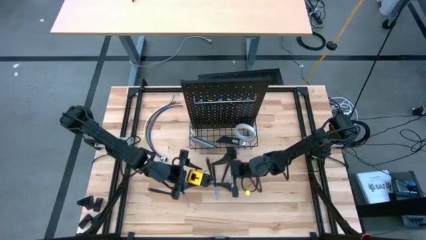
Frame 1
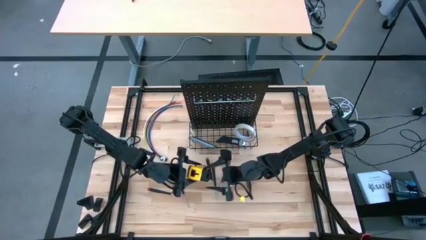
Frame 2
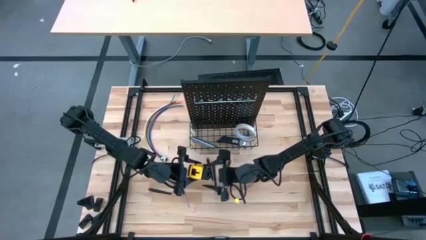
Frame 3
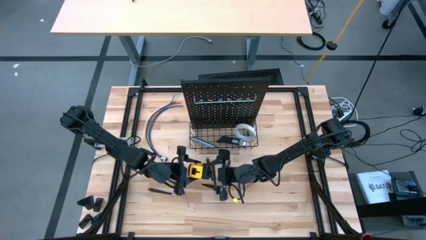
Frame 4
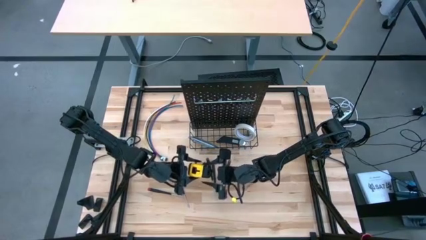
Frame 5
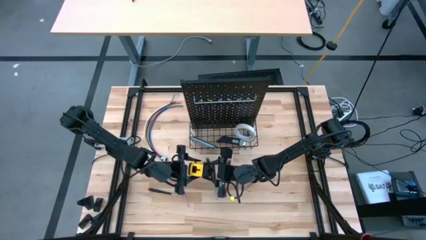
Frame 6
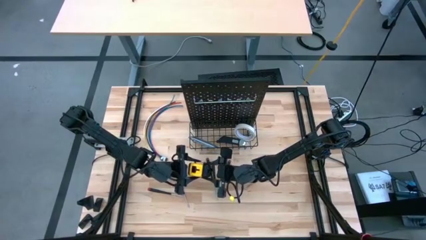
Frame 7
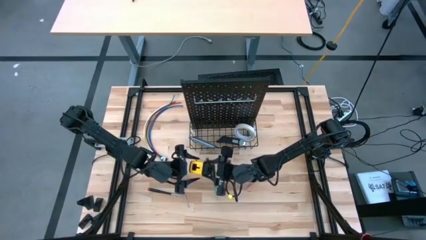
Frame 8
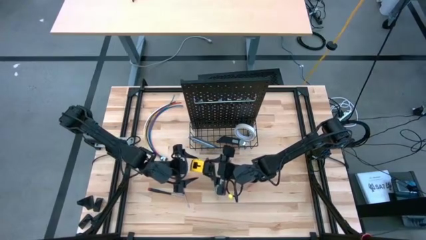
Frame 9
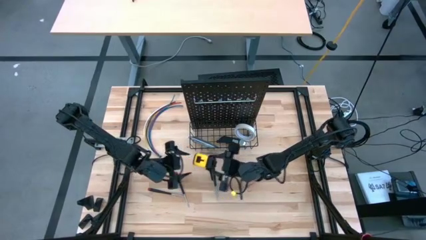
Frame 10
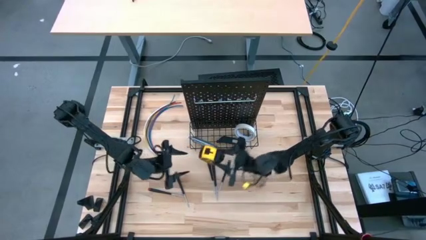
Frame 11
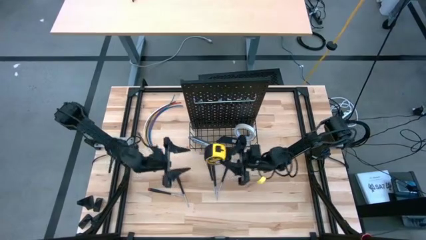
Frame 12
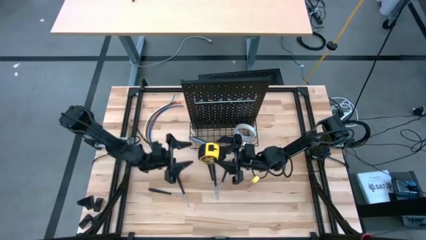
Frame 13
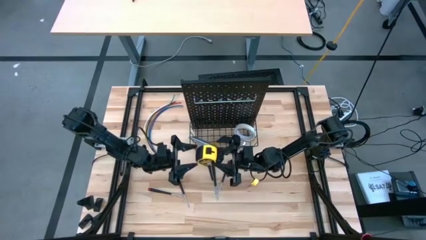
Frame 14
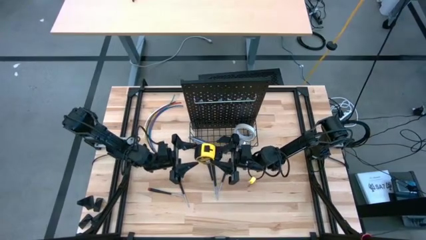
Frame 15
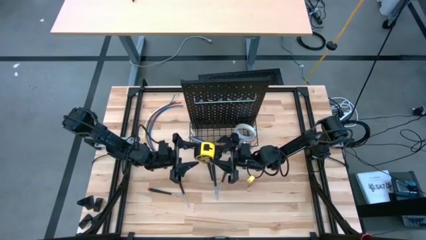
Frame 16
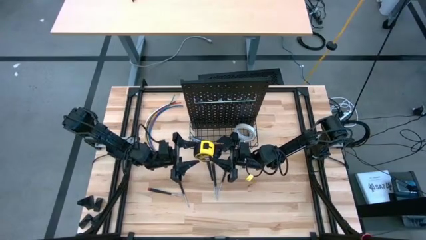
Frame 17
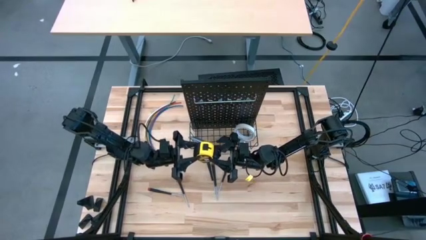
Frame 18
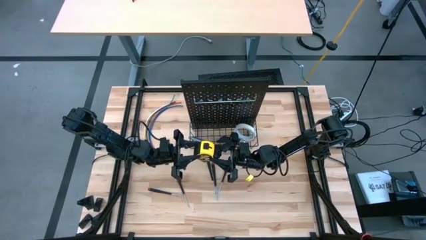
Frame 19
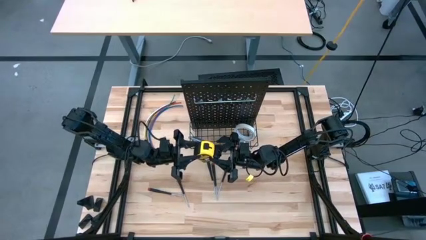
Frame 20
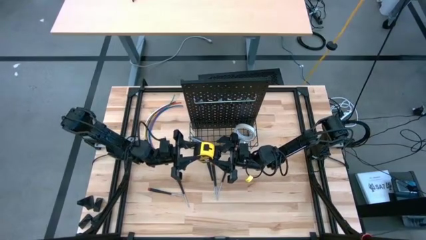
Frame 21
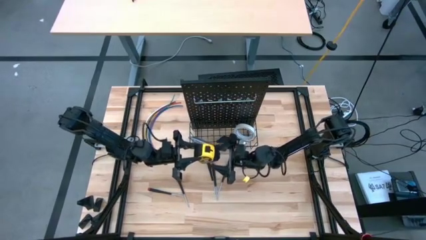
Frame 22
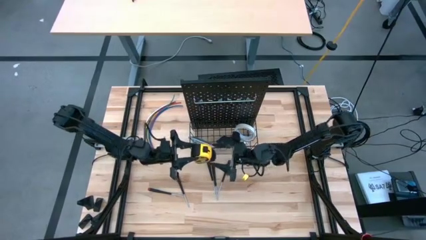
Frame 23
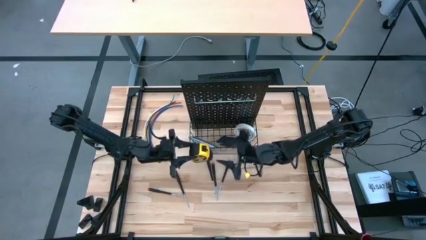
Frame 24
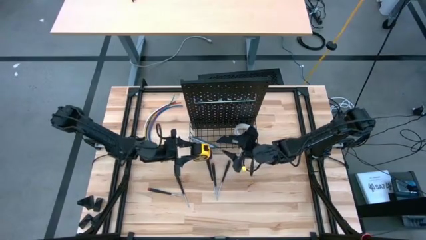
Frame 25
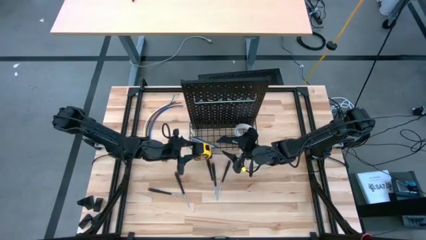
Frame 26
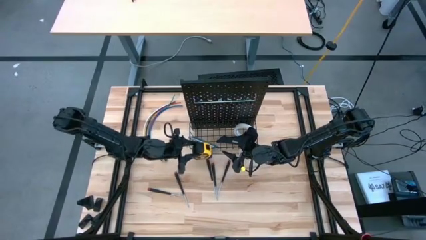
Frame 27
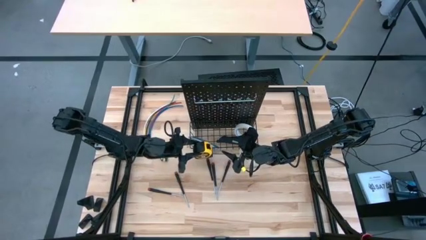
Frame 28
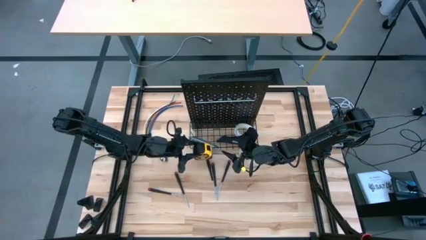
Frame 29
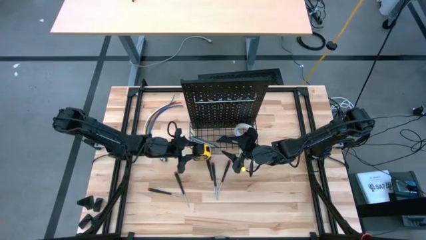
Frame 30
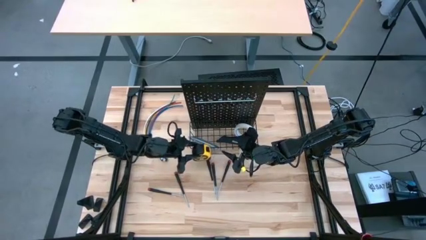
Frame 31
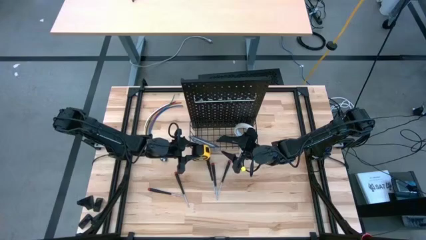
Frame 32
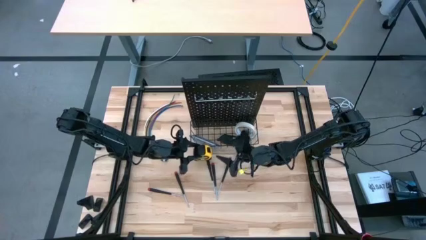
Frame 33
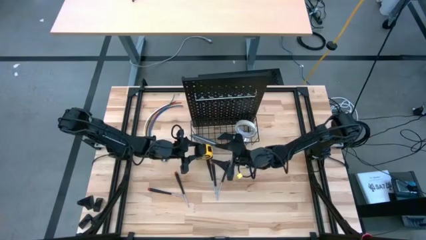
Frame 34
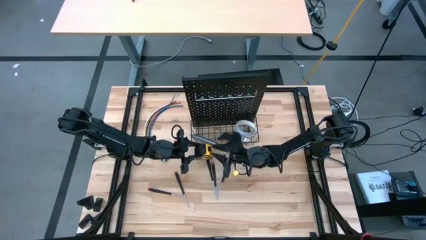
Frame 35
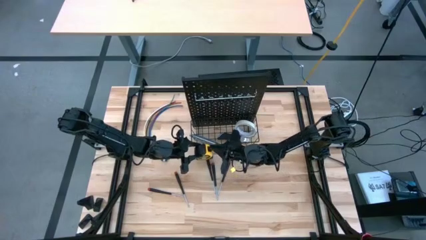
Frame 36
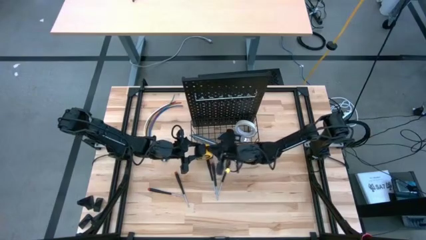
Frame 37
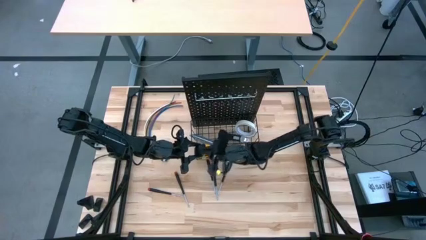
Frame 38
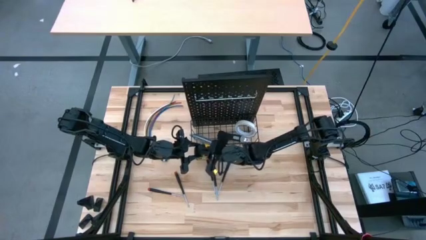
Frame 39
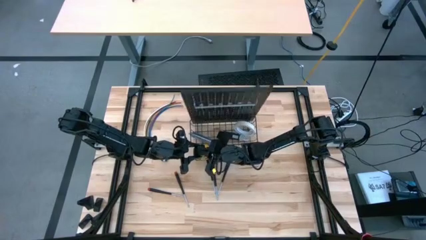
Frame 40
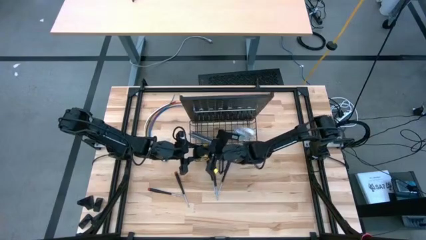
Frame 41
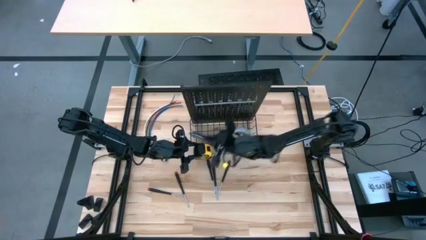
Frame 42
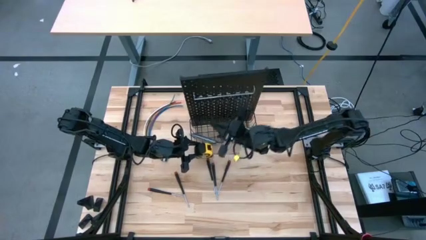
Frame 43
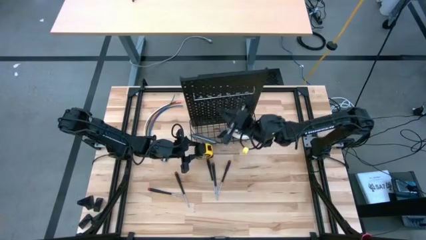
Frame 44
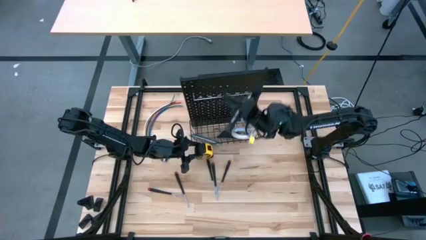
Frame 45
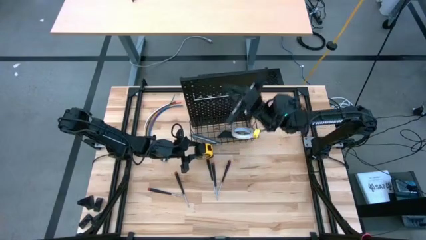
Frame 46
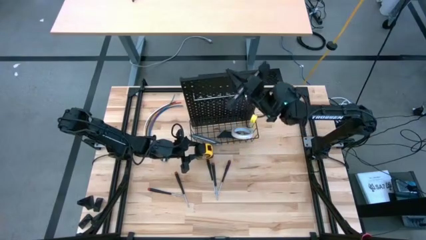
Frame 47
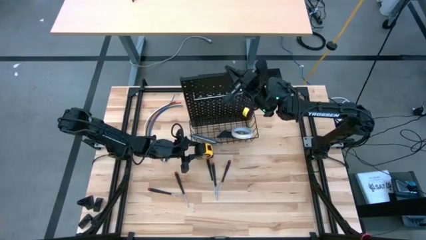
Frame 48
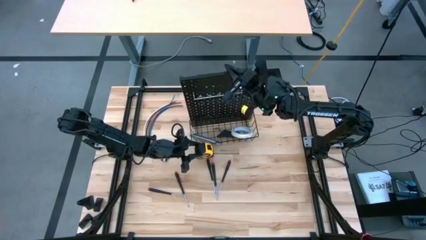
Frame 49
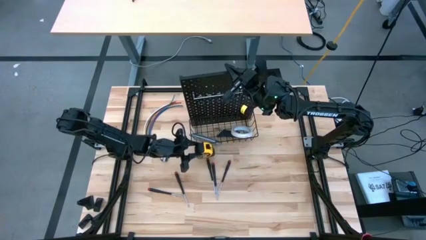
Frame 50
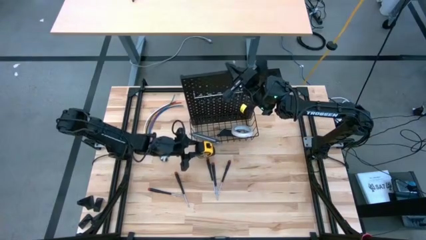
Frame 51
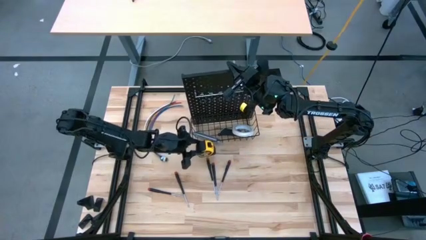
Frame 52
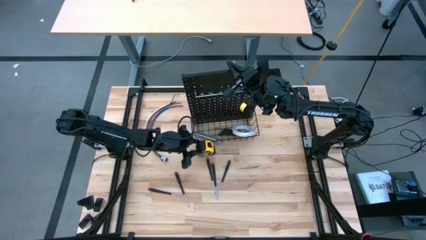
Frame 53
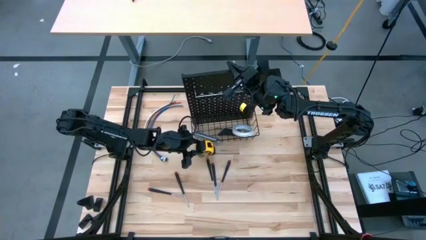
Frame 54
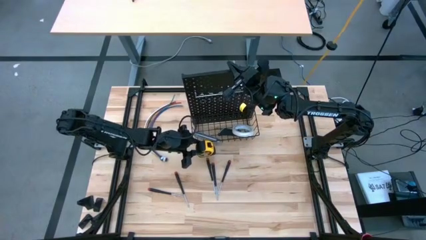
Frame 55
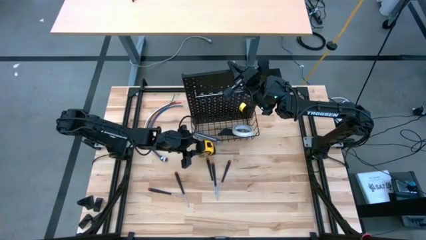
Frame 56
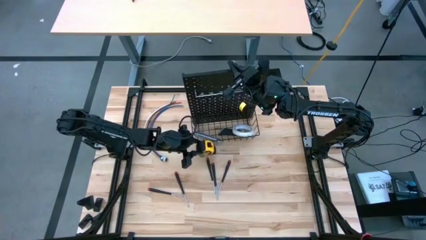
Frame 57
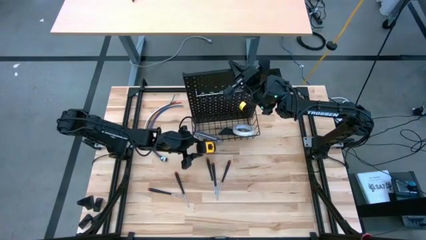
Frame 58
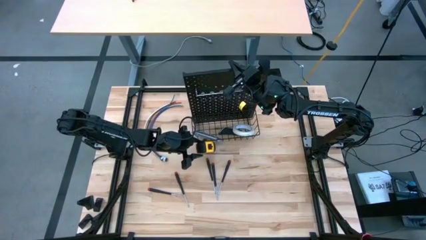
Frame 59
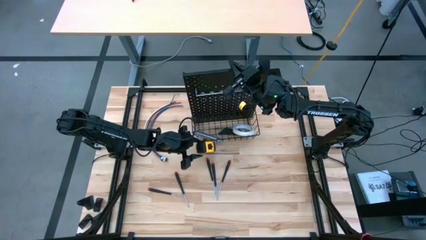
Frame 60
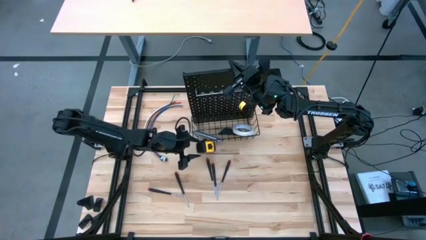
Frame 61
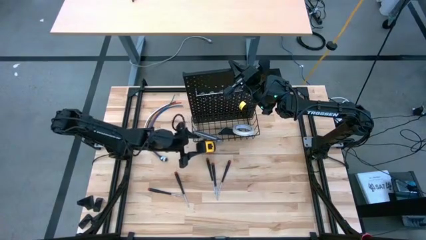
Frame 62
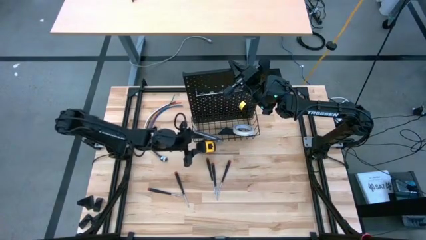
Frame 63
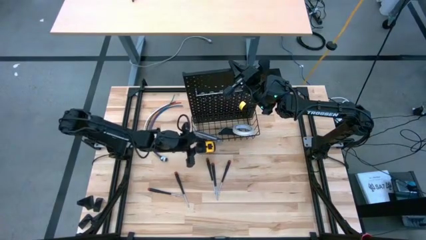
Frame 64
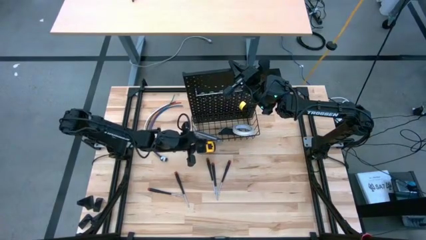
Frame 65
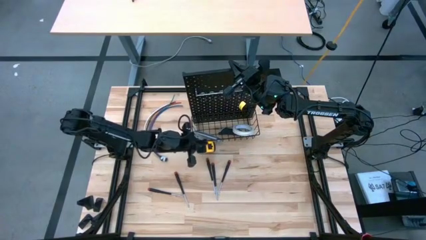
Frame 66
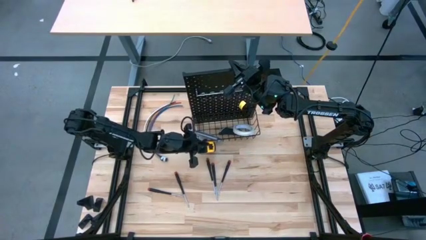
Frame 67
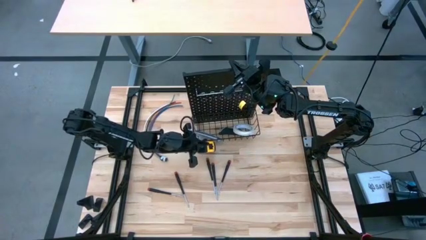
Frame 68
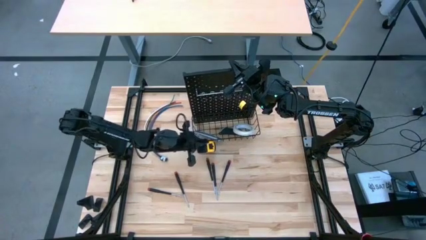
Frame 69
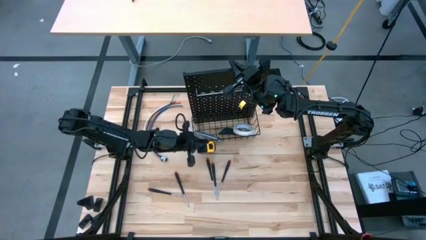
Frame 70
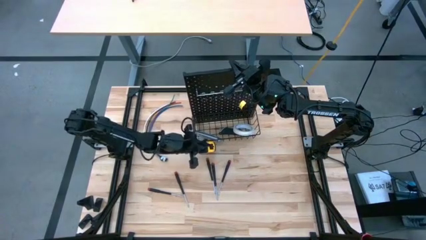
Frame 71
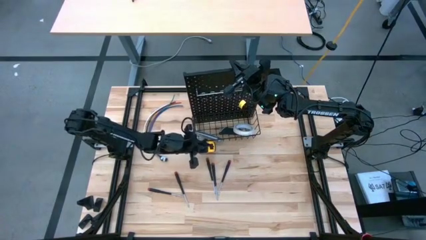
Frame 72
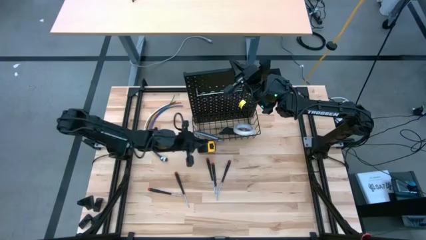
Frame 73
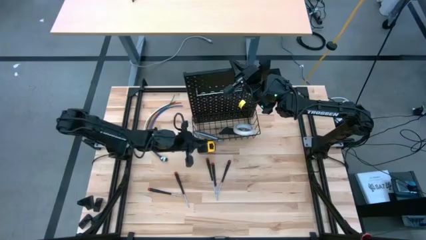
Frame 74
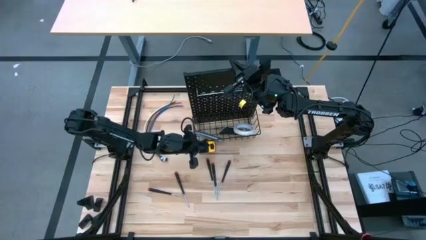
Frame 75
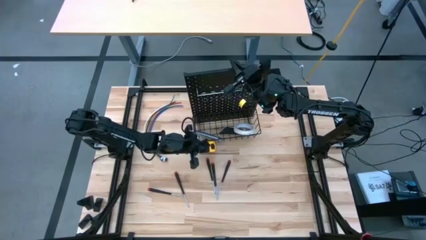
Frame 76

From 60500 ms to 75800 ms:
Task: Hang tools onto peg board
Hang the tape measure onto the wire basket on the pegboard
